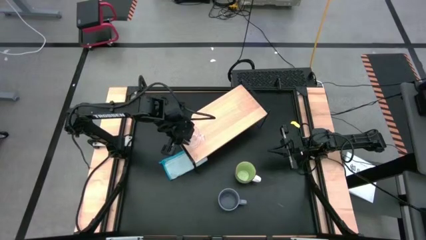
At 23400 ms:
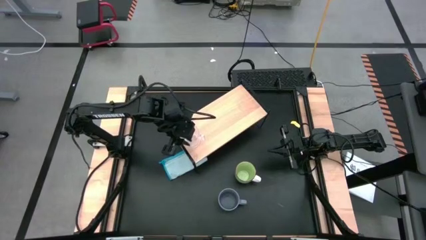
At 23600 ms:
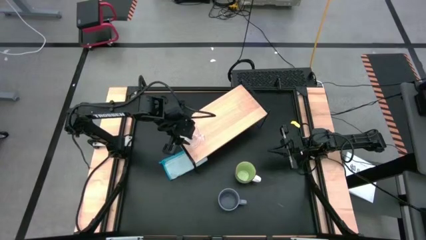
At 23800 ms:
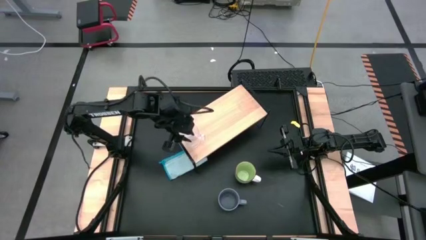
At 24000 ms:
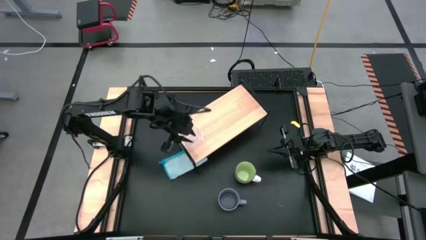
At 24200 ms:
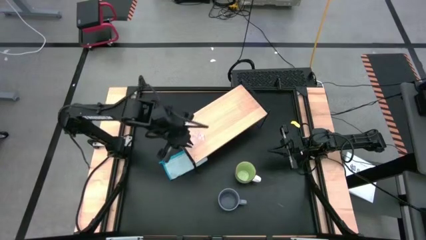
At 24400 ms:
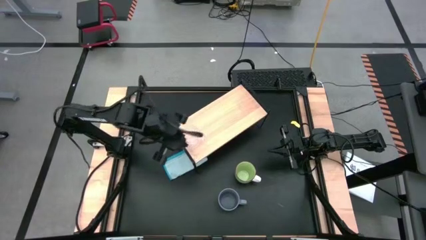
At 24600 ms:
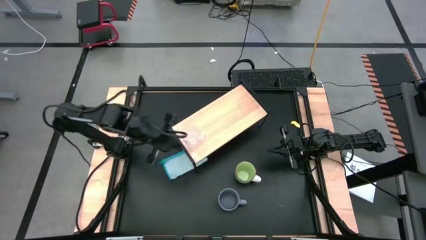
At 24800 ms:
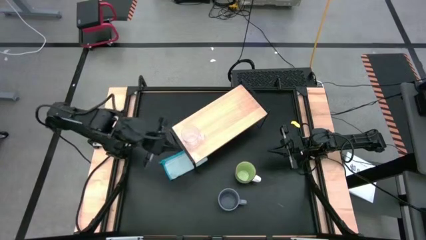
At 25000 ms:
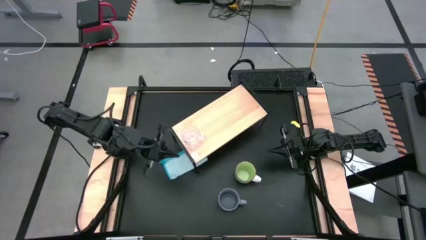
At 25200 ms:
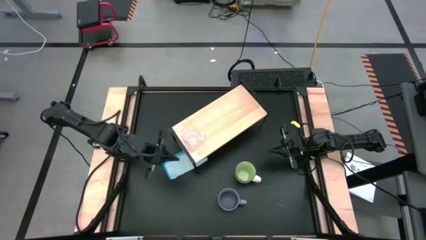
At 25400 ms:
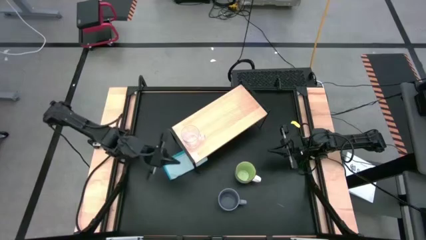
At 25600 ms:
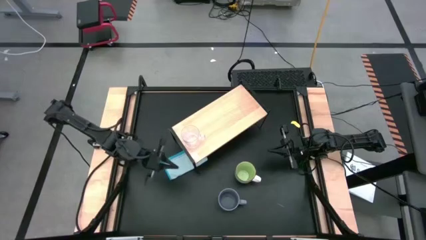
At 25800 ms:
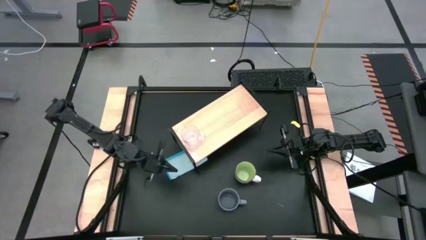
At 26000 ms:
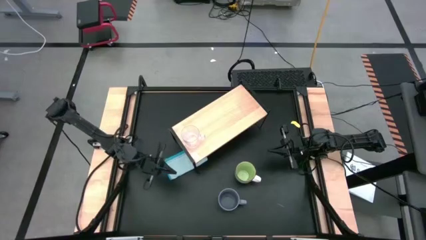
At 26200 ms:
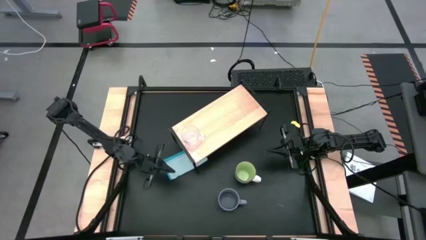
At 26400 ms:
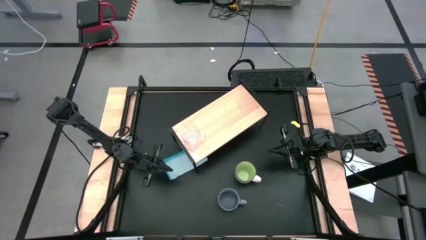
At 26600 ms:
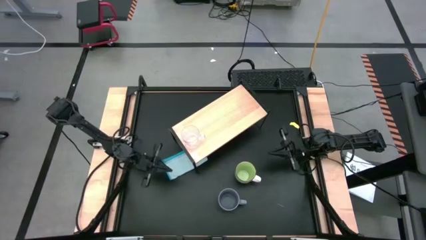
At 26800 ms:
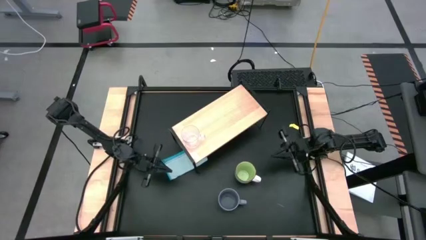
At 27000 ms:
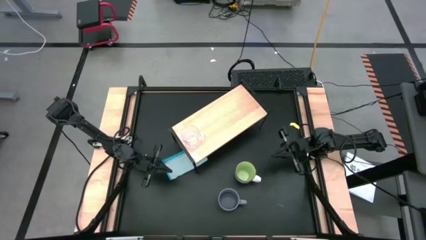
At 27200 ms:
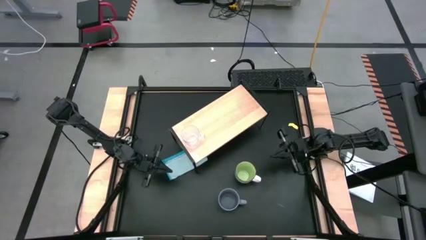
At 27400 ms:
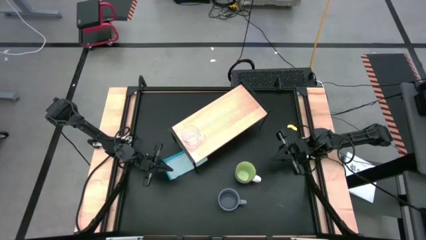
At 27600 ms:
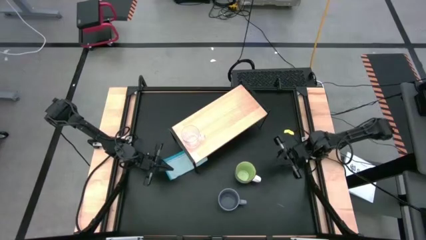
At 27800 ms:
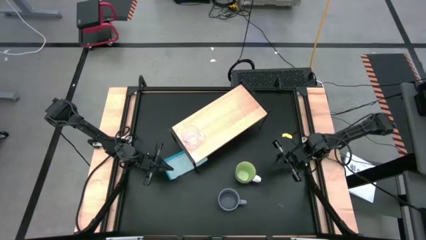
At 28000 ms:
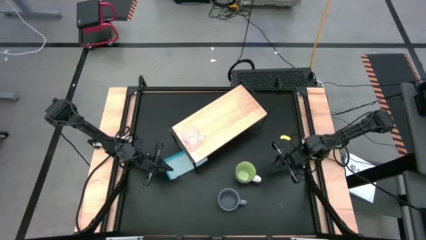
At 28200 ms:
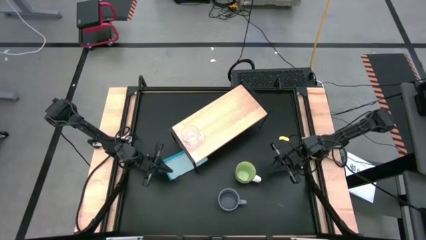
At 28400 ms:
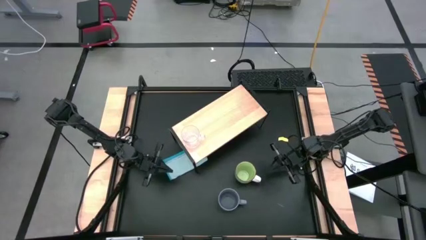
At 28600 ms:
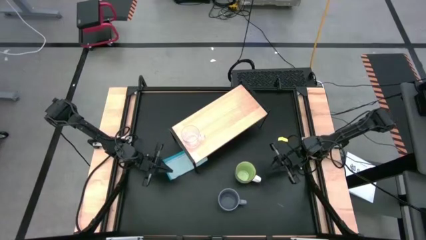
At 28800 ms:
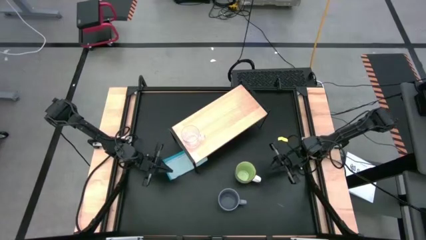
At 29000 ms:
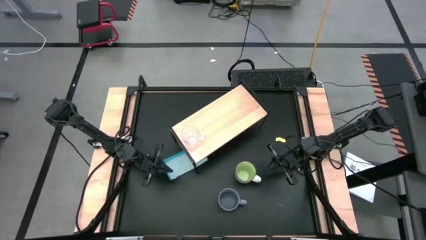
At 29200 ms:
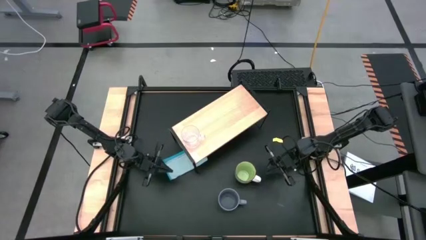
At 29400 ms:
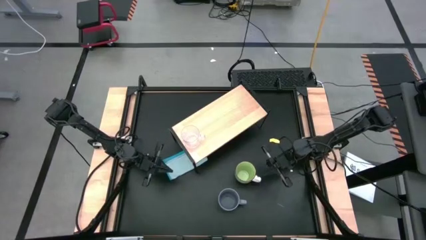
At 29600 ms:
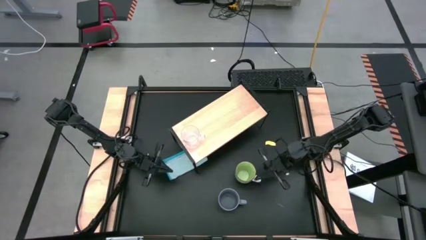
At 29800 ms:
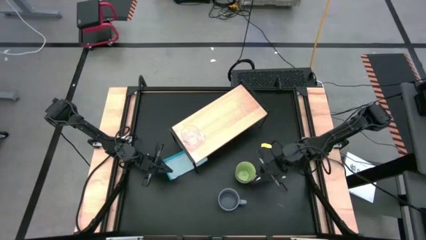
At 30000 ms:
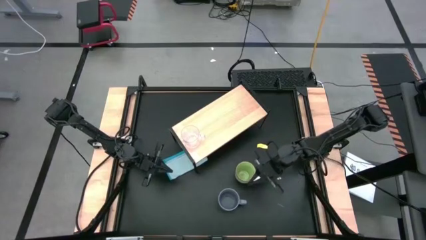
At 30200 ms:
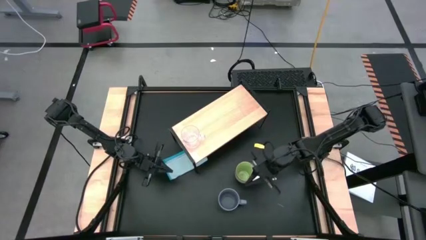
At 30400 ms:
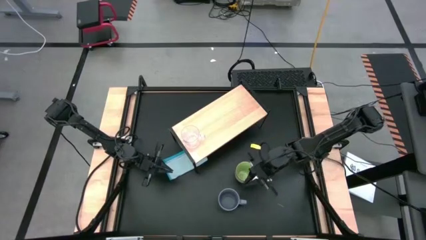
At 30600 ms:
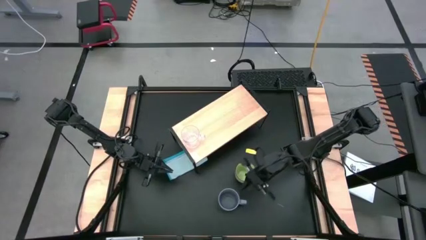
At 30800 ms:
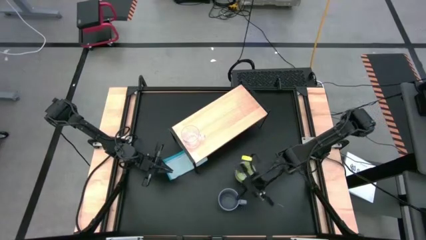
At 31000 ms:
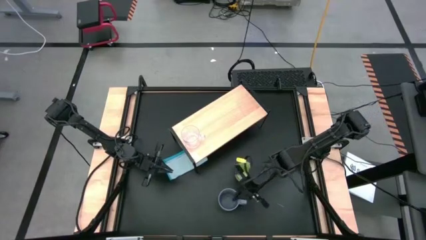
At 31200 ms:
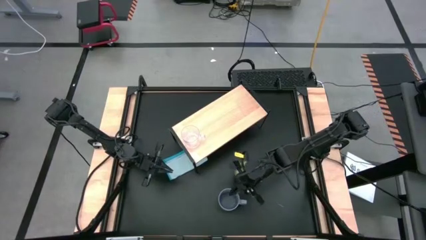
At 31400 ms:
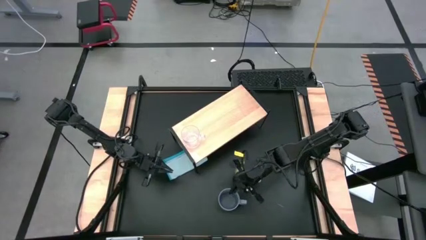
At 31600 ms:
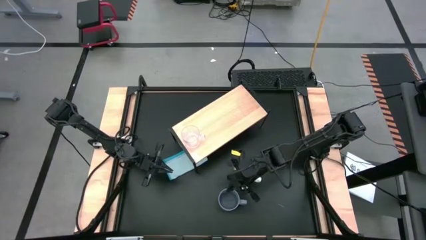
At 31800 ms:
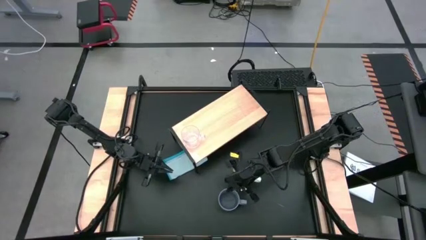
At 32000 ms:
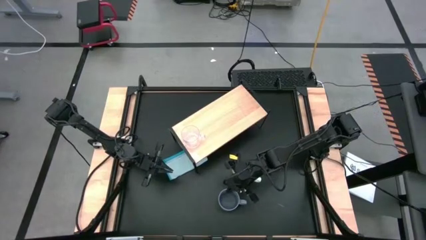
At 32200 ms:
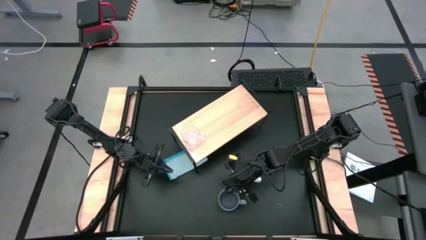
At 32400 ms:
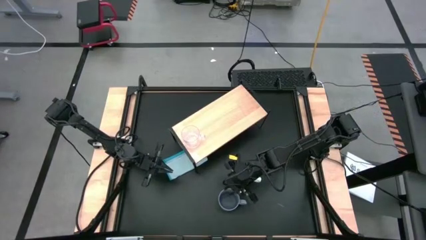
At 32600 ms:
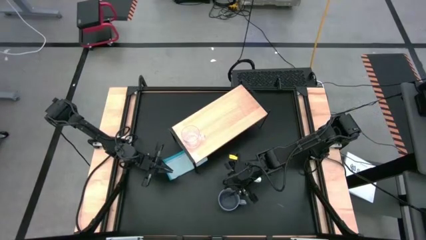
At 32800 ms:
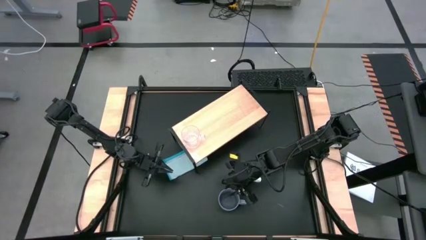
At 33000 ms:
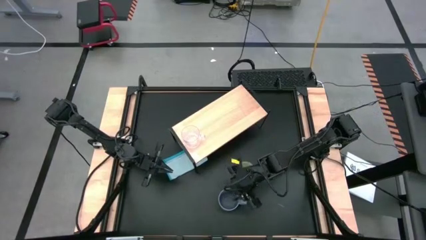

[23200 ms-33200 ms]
Task: Stack small to large cups/mugs on shelf
Put the gray mug on the shelf
